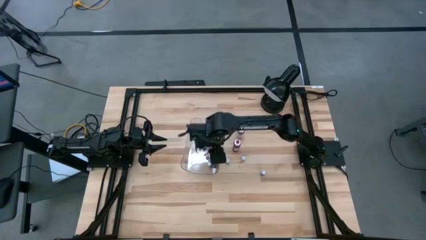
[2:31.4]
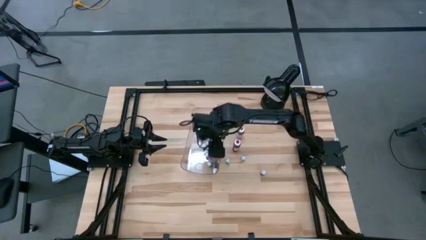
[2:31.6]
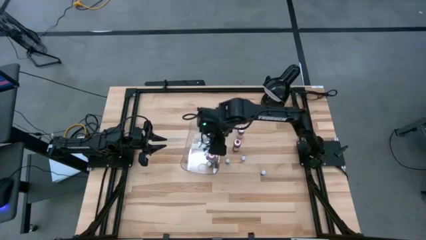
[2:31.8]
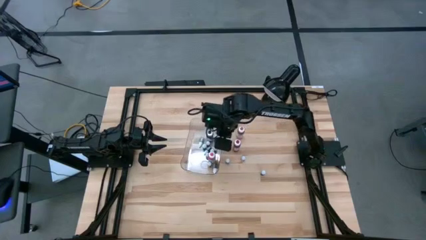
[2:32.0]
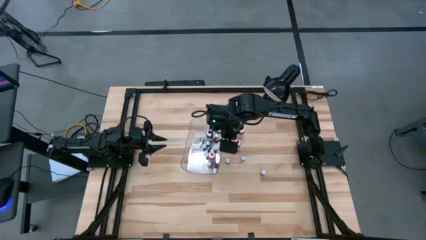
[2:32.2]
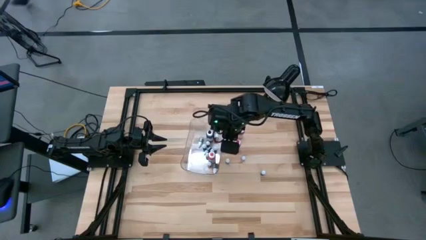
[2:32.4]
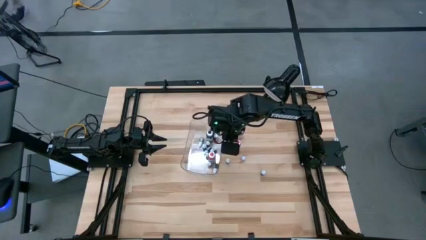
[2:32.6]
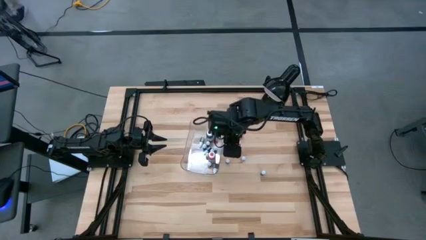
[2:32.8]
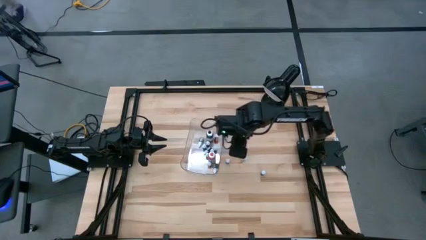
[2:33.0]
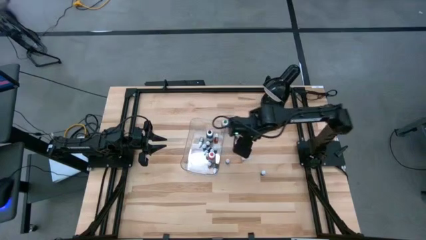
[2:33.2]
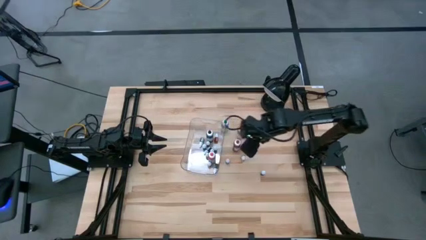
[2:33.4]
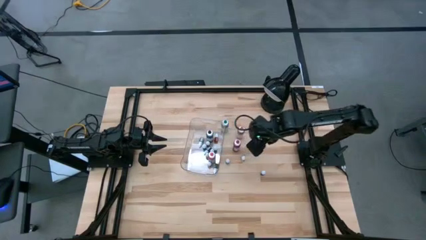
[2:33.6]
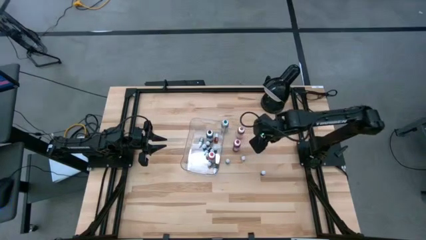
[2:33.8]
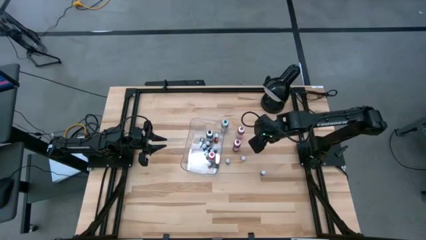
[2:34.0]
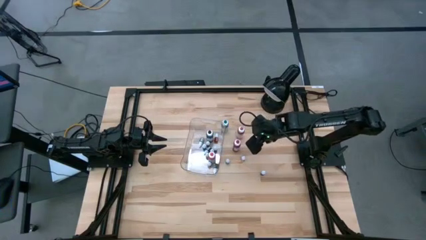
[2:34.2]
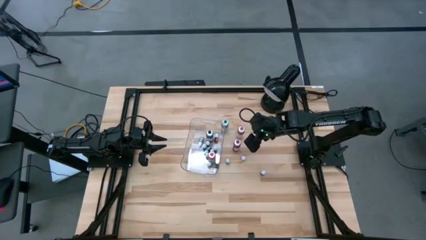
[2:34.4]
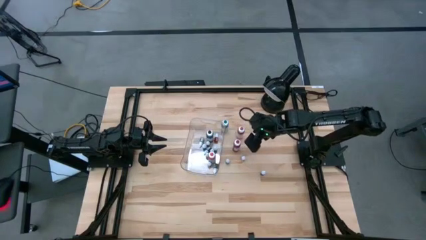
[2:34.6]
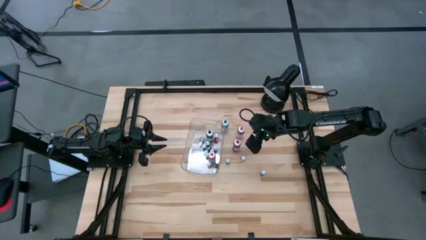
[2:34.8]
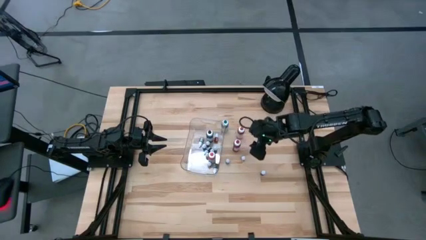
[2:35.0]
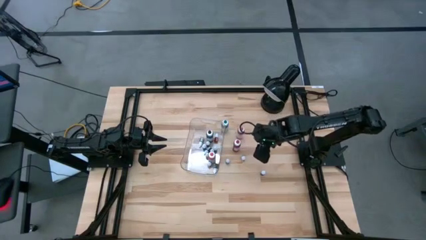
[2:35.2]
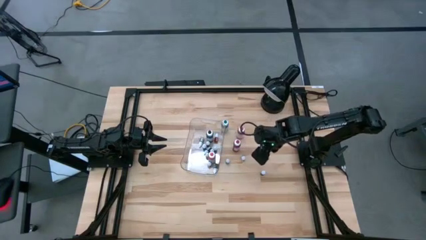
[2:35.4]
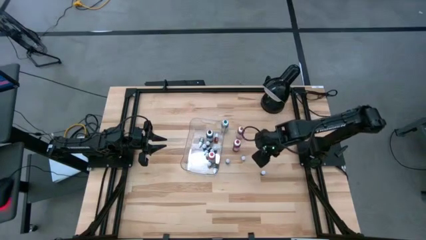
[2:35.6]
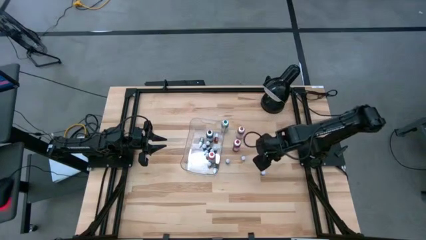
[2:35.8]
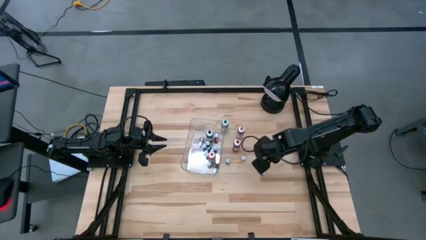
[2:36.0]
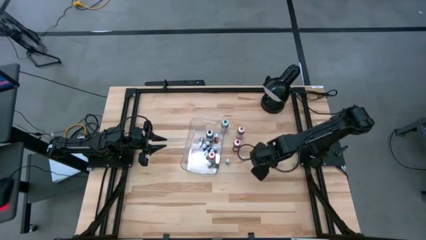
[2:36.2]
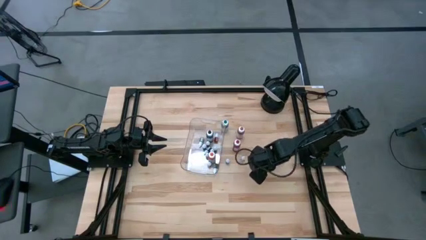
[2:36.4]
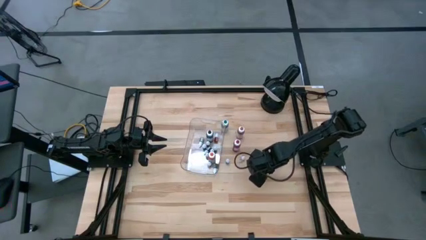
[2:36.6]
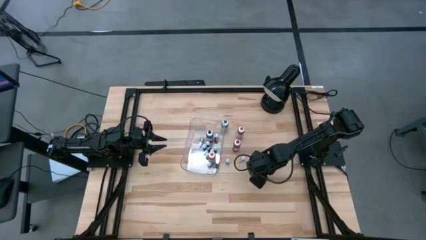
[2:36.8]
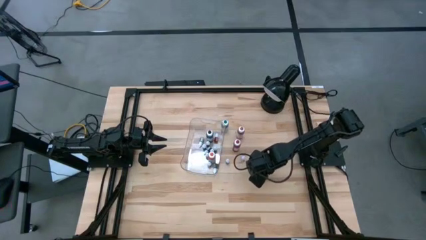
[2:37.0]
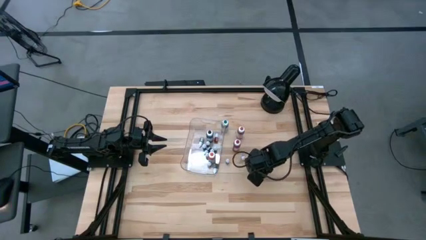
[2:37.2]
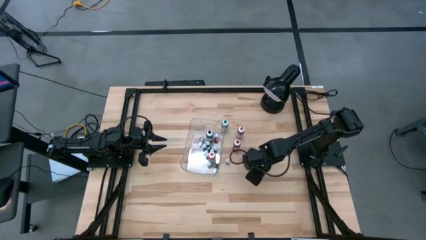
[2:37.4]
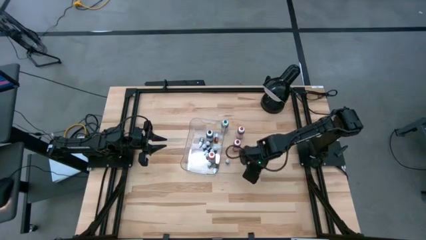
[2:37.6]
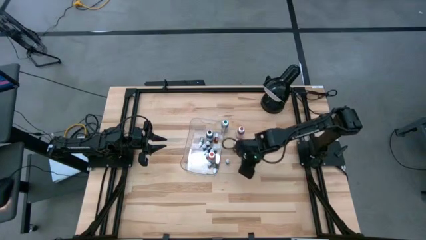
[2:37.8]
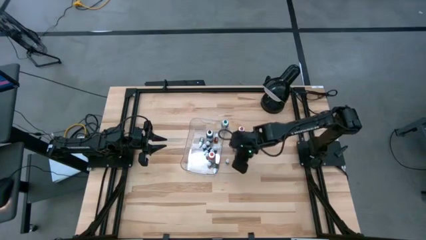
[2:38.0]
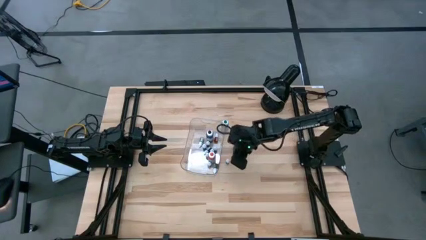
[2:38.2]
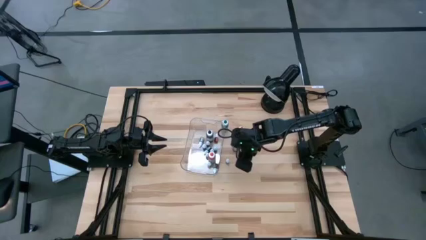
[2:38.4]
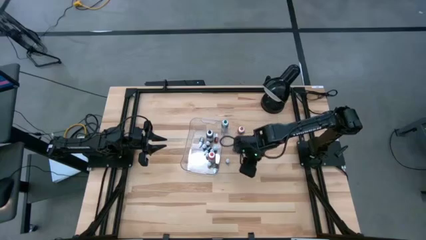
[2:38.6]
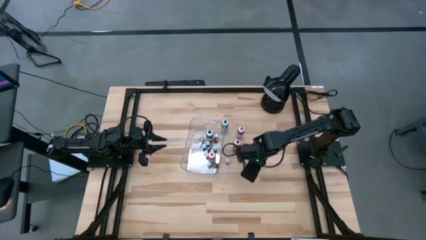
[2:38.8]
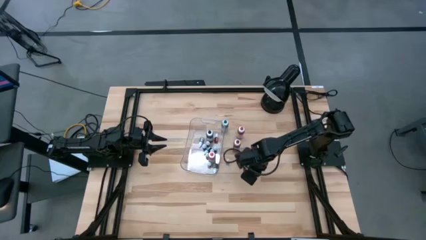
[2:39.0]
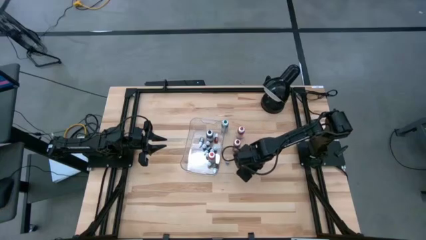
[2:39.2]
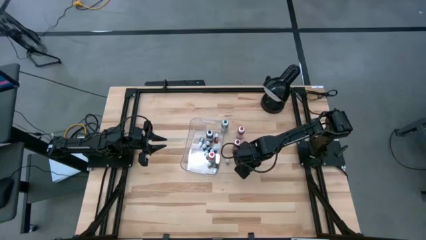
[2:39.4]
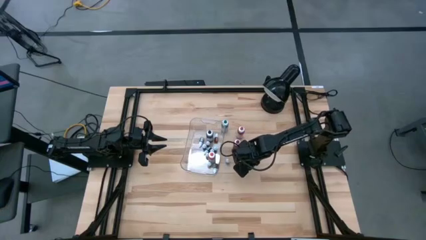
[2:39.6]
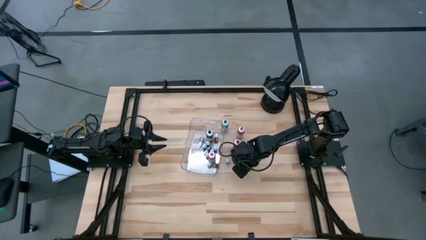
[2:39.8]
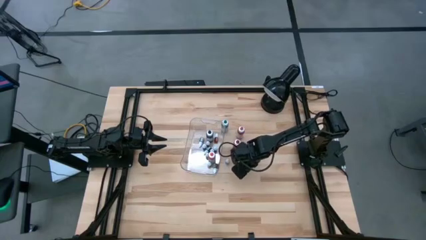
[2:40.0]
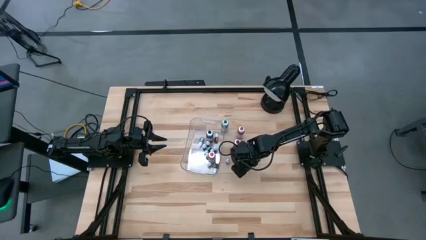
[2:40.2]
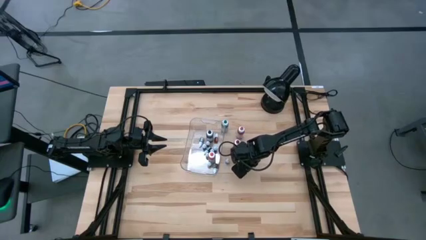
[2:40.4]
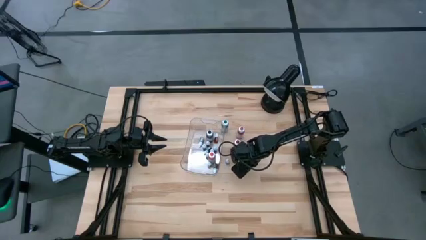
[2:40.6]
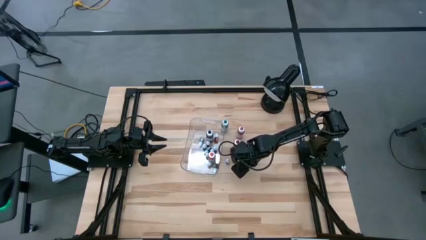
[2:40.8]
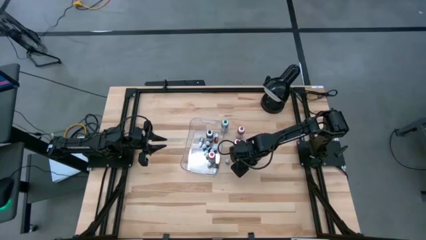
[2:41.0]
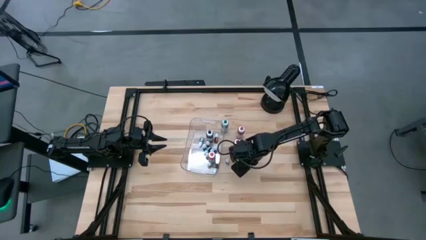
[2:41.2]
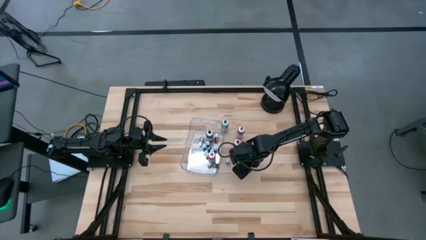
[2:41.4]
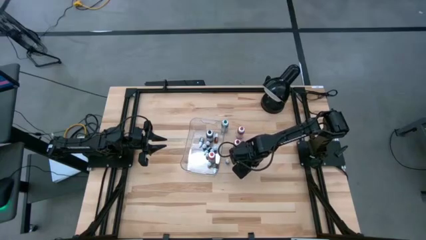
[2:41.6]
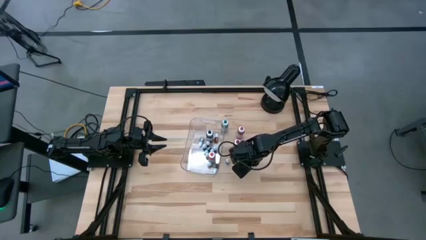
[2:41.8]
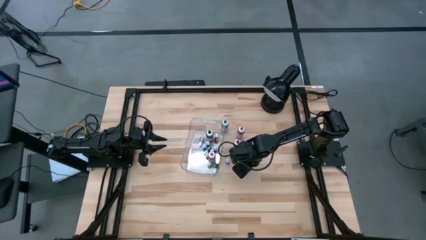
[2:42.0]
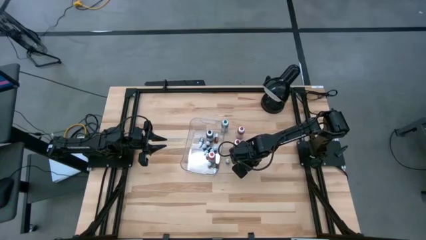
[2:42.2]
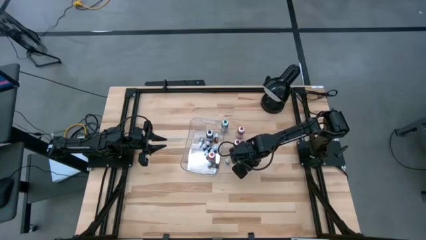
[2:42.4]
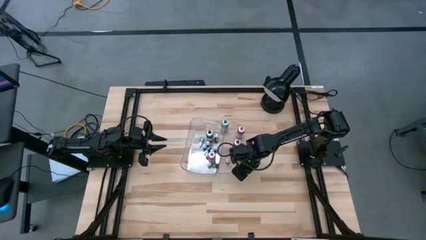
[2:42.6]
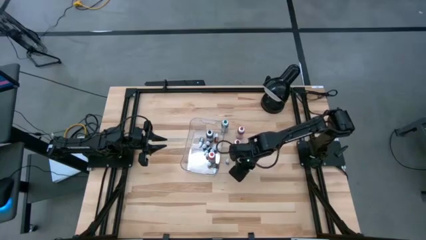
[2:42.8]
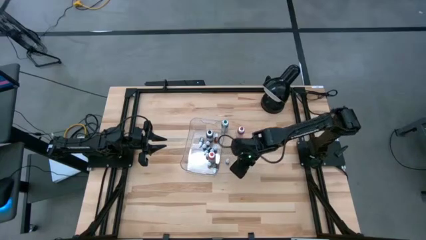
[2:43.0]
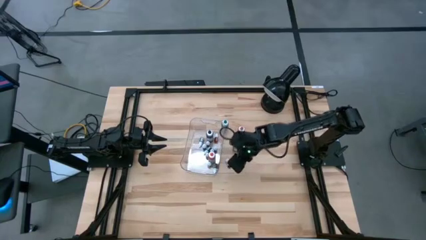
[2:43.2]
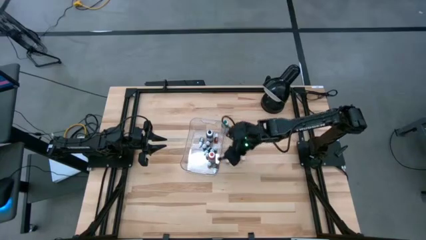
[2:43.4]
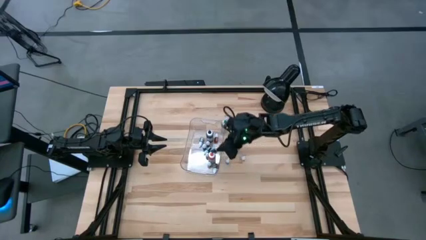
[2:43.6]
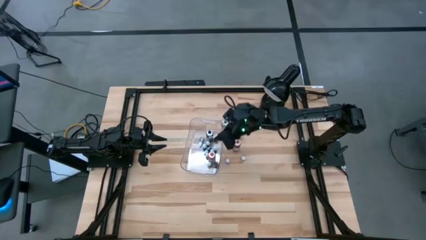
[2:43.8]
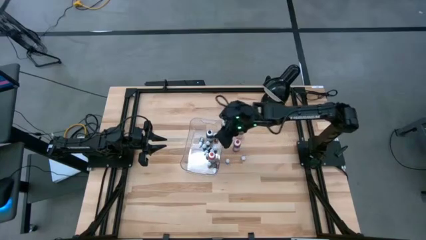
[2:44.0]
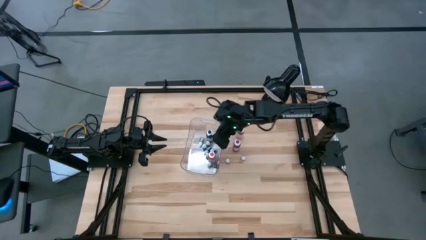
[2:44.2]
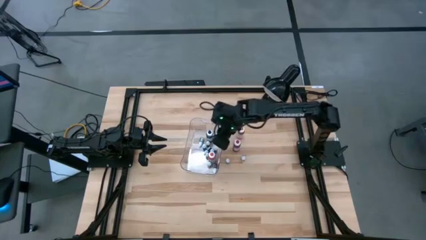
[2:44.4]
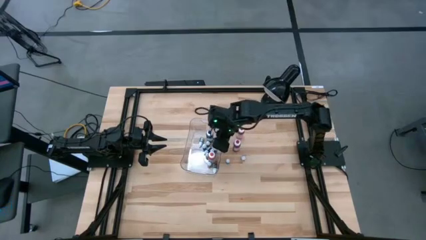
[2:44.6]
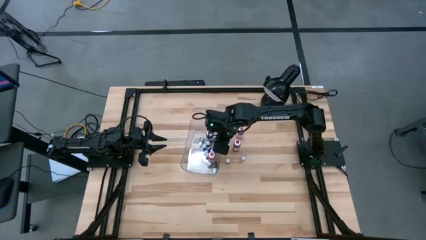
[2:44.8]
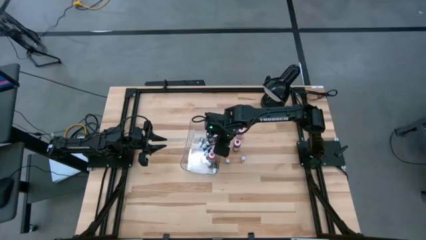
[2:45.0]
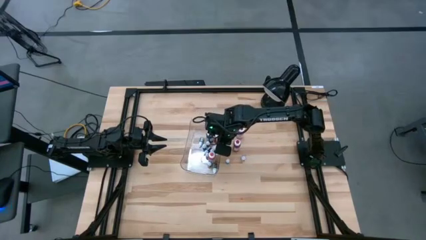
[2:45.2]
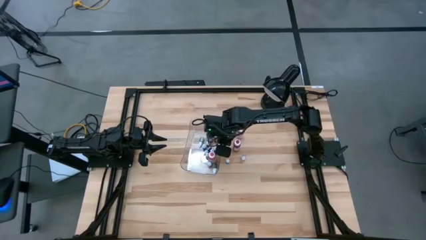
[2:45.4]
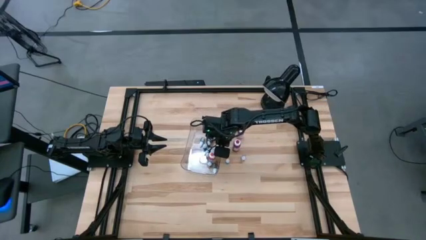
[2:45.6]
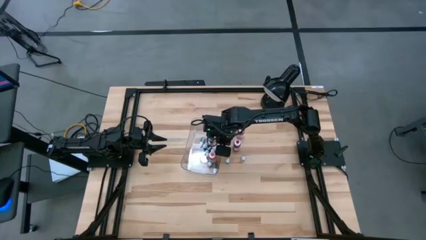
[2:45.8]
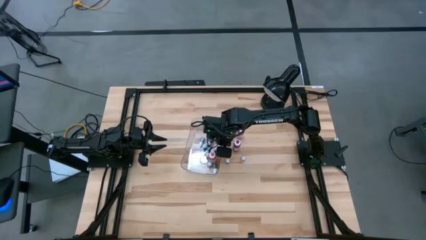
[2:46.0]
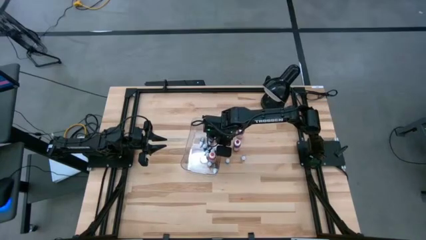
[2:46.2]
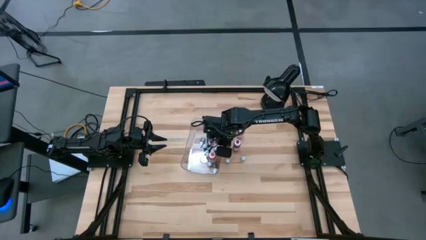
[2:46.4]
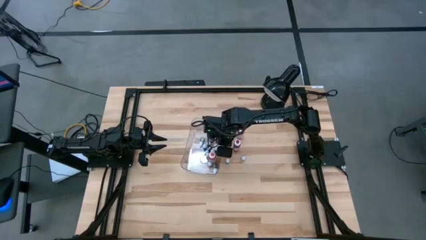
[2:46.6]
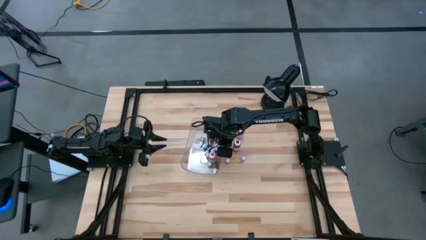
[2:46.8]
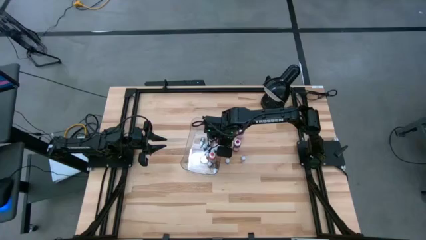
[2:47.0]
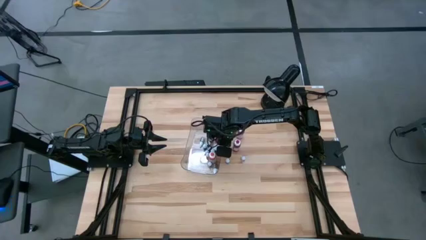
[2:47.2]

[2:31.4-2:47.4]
Task: Pick & Place food coloring
Put the dark blue food coloring bottle into the transparent bin

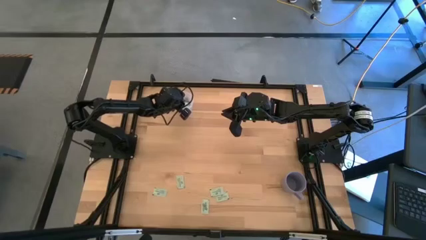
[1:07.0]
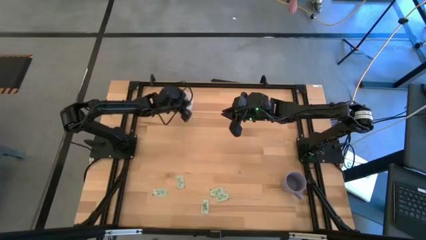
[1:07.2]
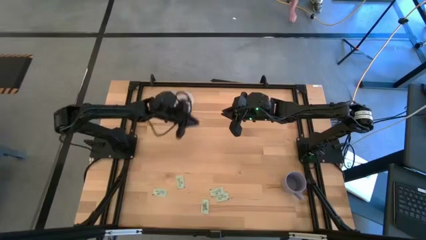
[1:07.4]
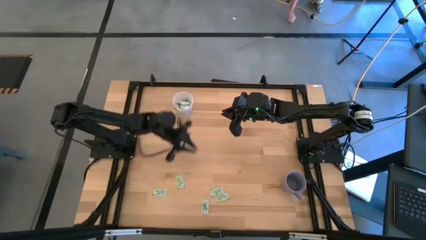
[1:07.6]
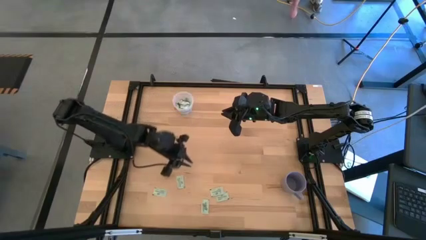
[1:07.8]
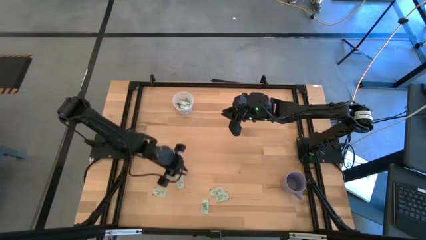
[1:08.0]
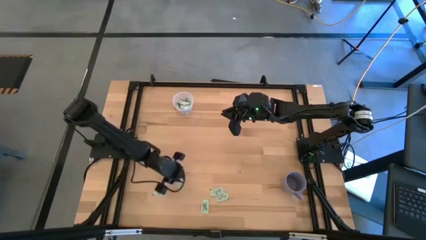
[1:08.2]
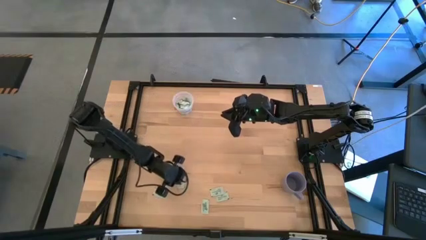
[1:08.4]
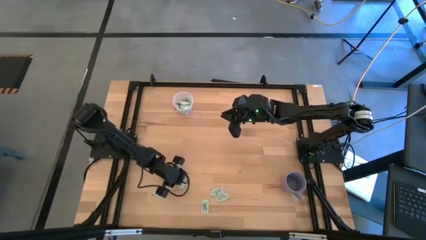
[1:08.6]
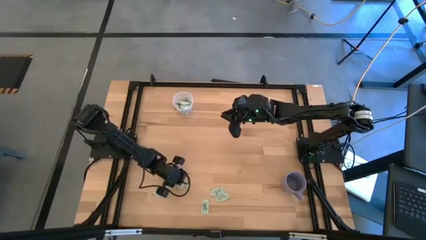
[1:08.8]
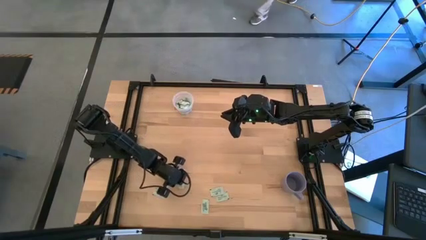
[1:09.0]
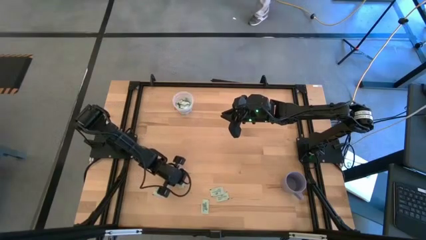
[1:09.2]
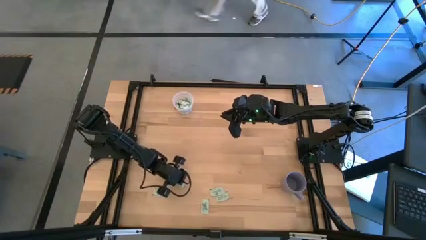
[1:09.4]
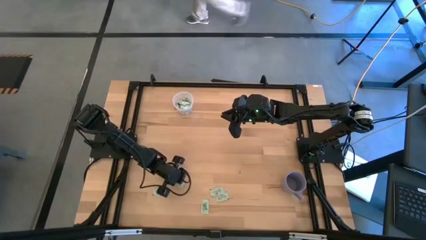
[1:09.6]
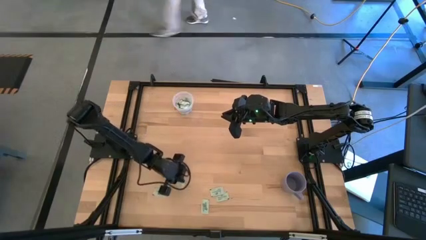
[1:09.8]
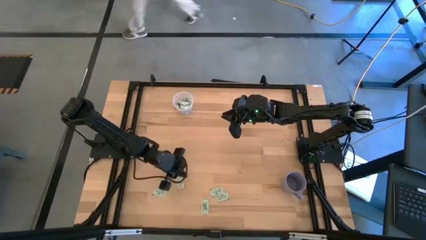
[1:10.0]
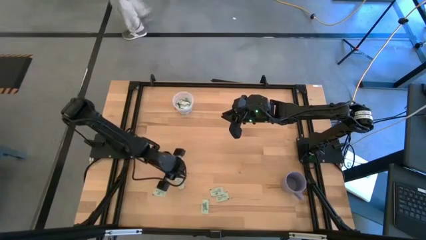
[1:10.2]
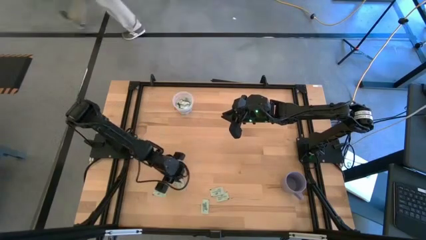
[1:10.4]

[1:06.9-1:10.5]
Task: Pick and place items into bin
Put the stevia packet into the transparent bin
